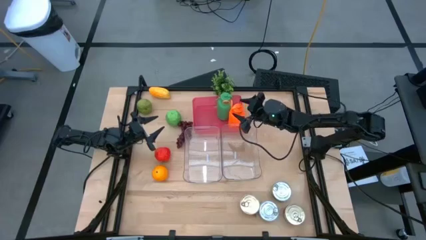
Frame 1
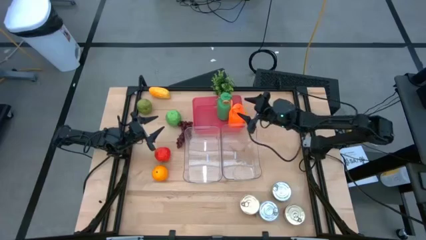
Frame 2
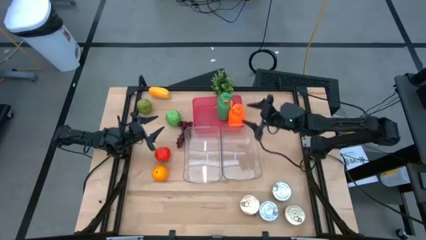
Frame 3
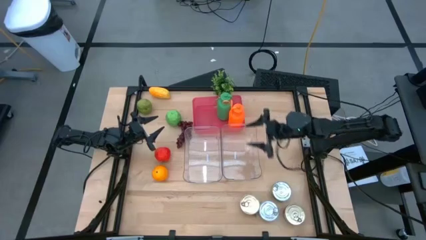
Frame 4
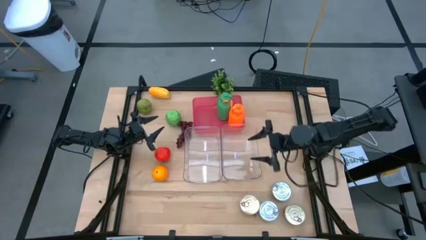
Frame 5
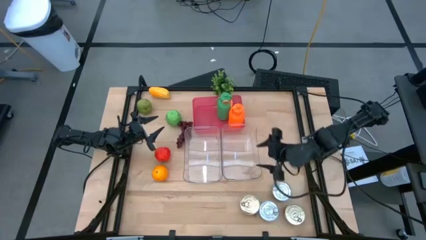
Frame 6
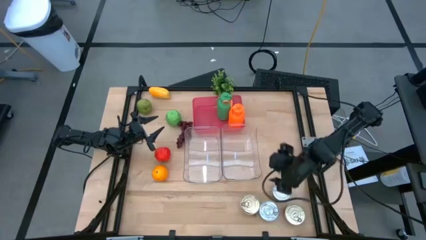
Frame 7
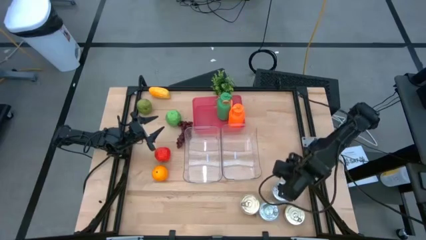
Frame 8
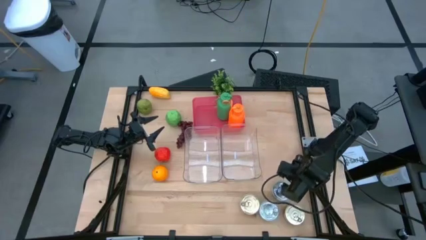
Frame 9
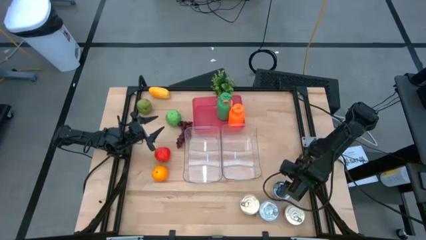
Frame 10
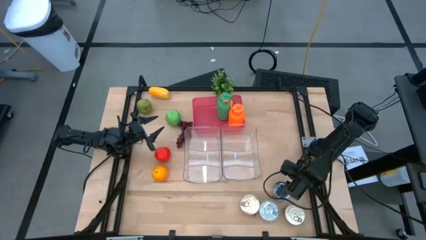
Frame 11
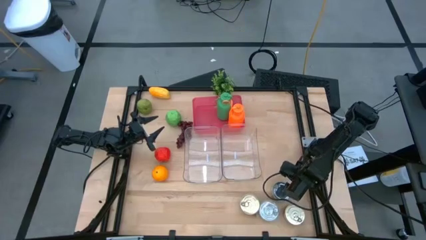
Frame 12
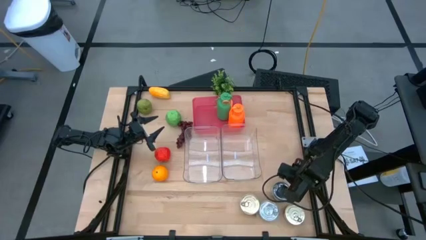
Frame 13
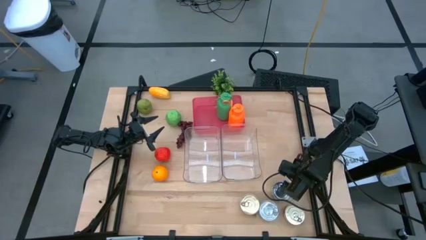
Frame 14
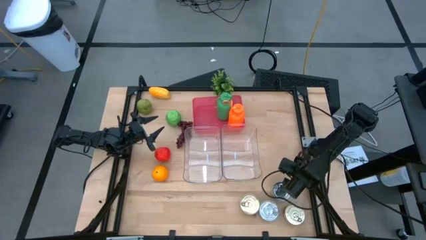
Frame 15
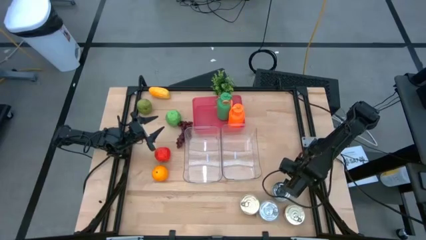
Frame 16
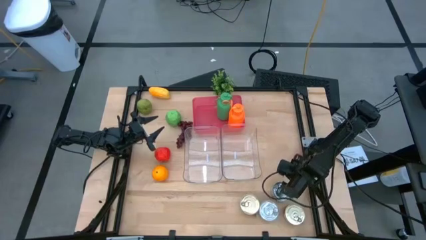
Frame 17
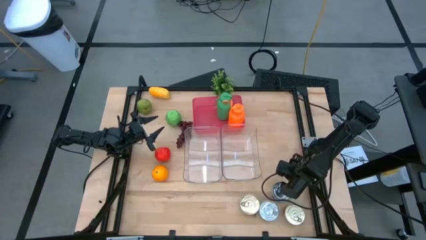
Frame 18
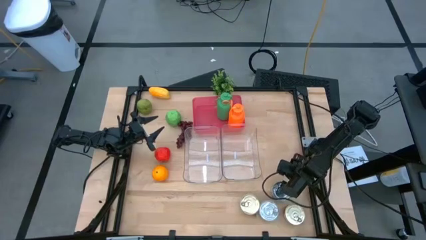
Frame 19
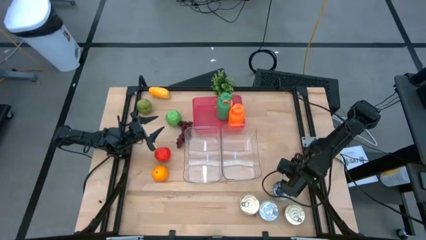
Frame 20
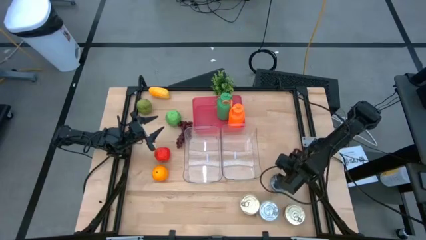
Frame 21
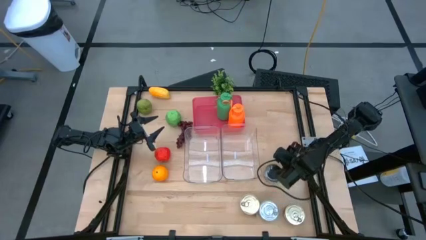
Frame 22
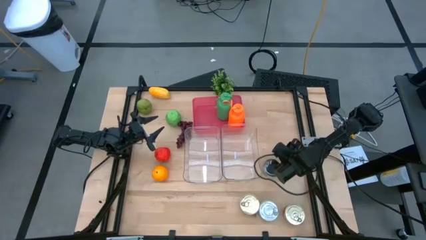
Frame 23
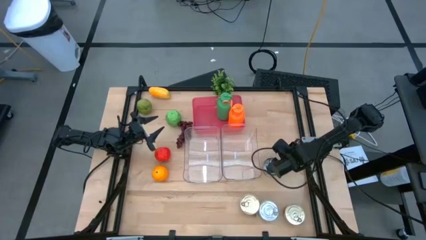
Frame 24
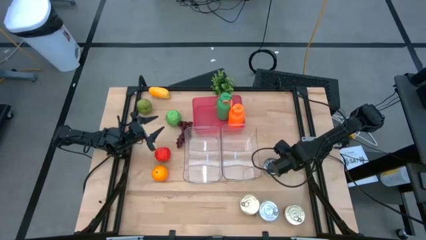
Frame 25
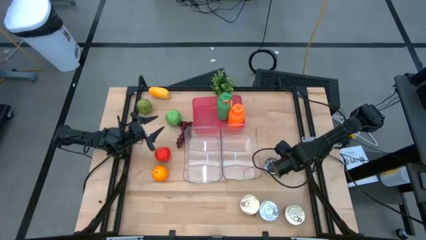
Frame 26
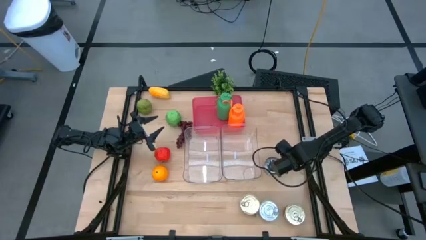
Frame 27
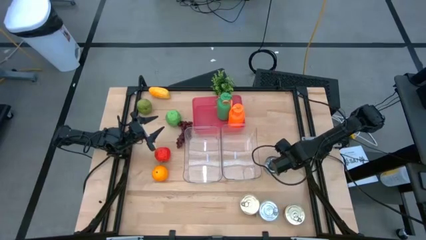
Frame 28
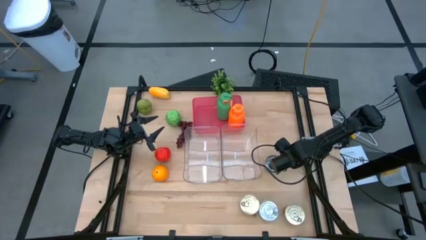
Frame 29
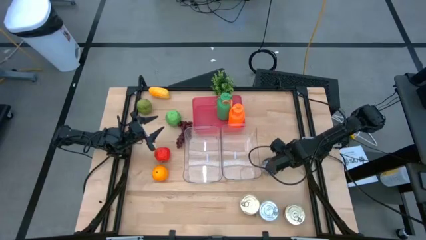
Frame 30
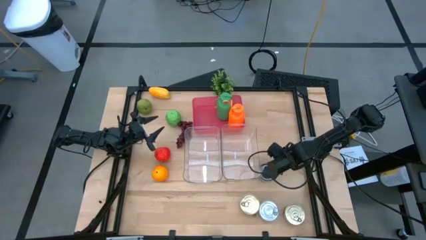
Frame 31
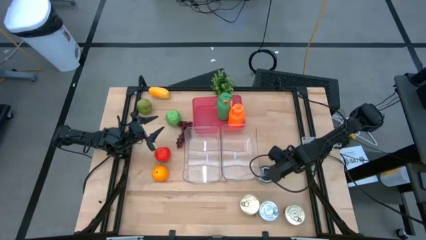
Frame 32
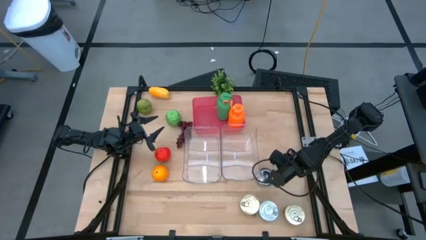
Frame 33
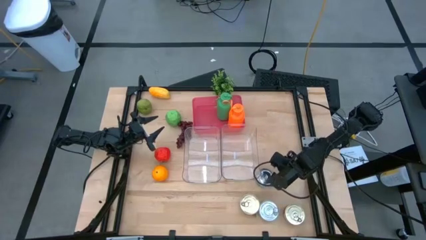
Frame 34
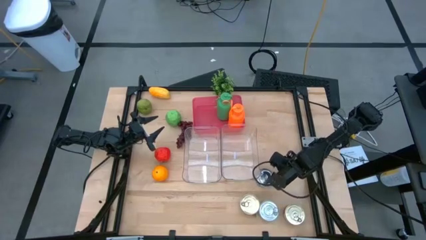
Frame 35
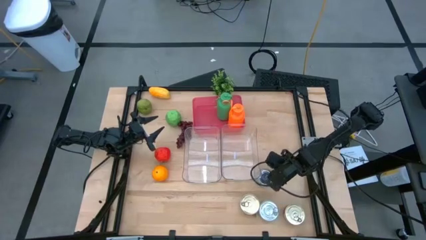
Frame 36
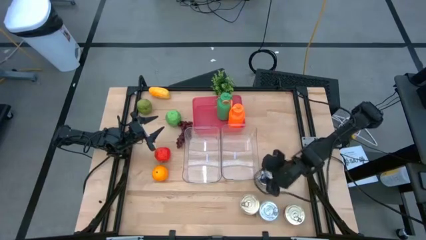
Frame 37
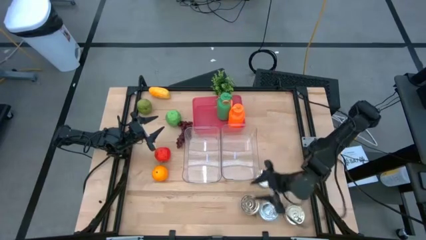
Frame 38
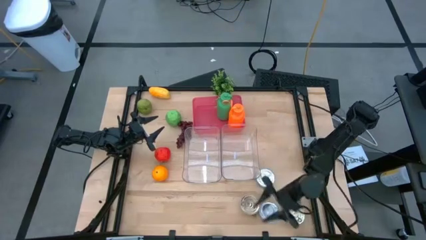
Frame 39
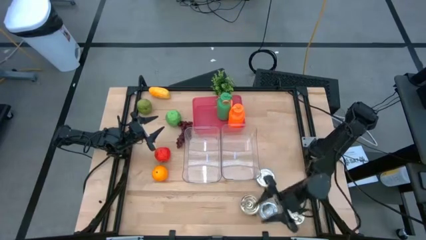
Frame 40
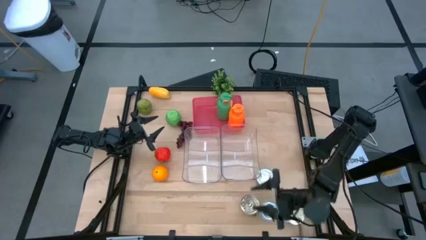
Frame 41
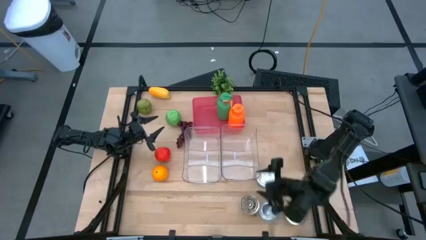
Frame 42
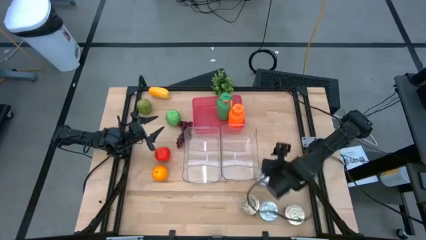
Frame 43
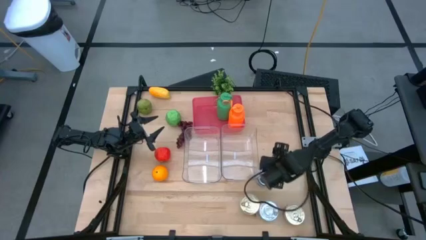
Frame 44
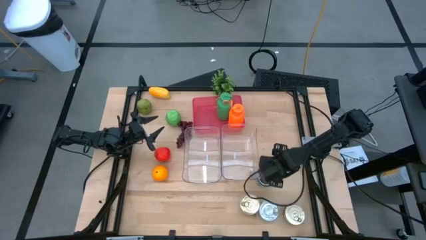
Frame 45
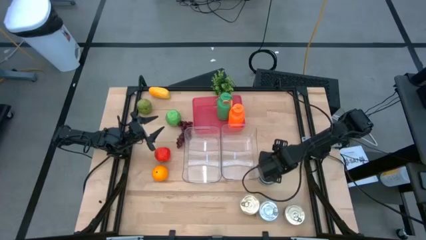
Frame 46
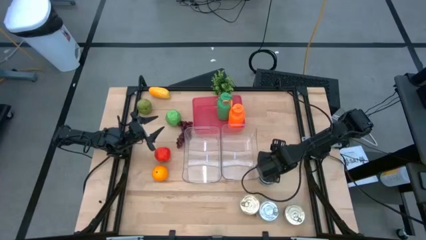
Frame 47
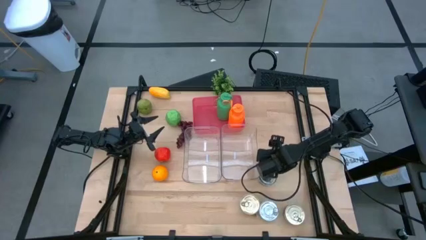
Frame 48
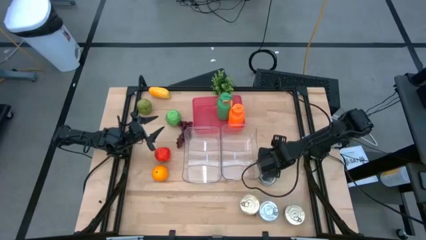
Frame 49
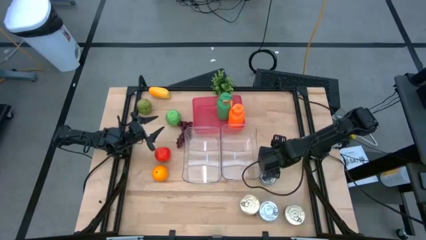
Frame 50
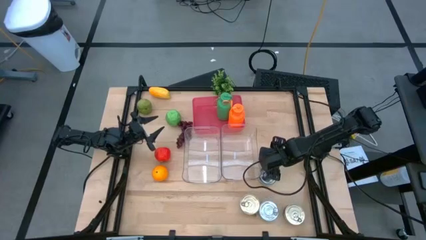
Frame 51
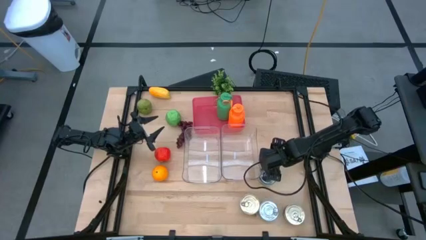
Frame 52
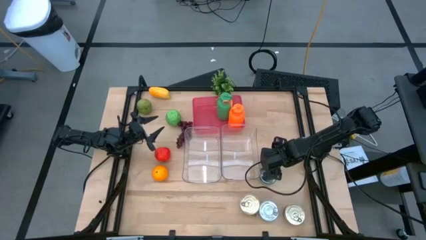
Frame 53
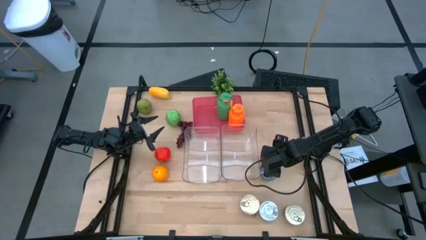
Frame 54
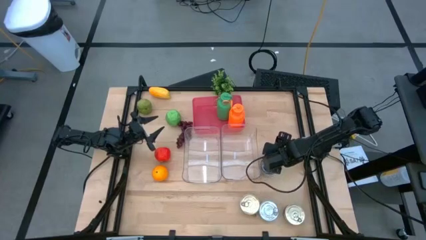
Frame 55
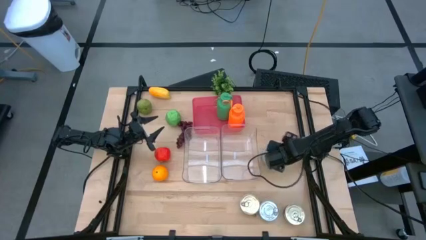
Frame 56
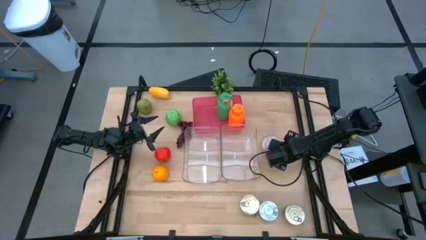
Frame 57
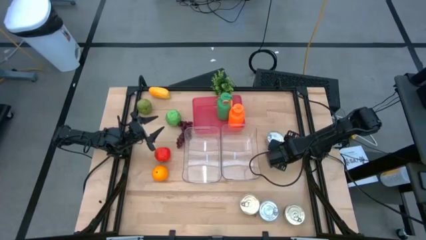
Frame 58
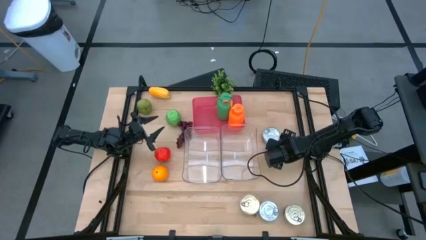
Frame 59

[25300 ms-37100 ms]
Task: Pick & Place Food Item
Put the top green tuna can into the right transparent bin

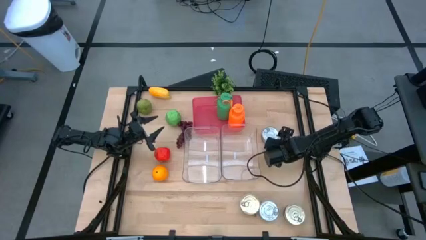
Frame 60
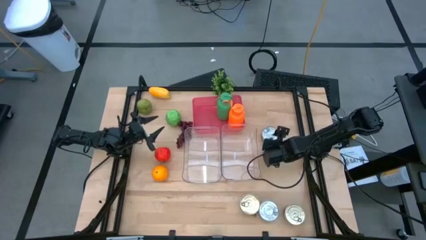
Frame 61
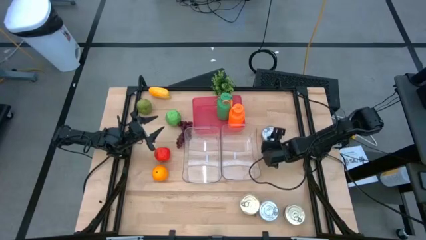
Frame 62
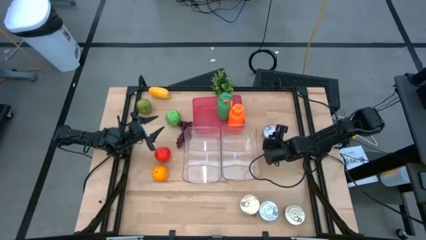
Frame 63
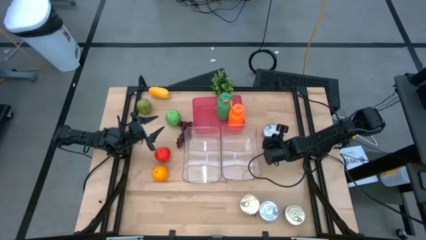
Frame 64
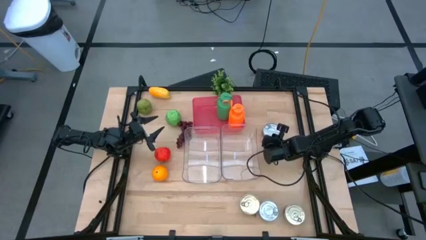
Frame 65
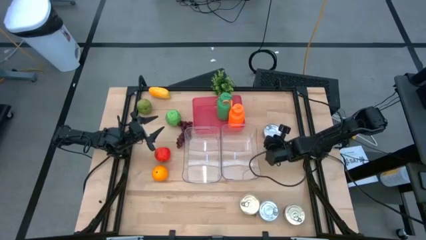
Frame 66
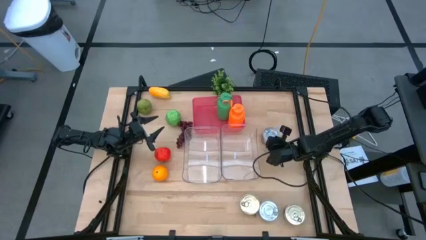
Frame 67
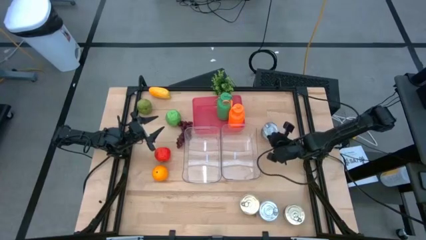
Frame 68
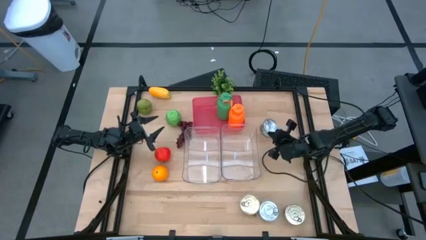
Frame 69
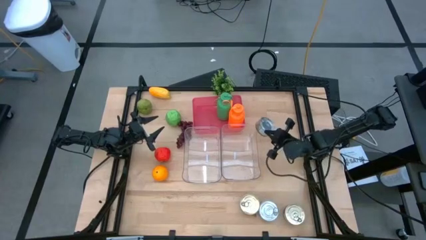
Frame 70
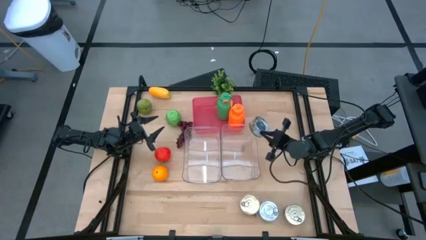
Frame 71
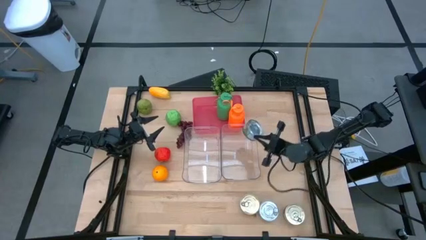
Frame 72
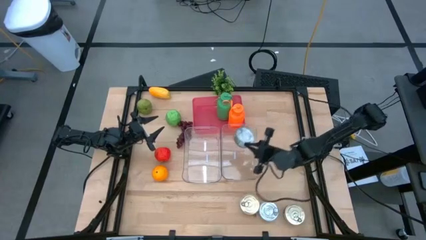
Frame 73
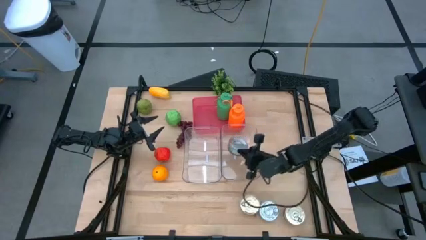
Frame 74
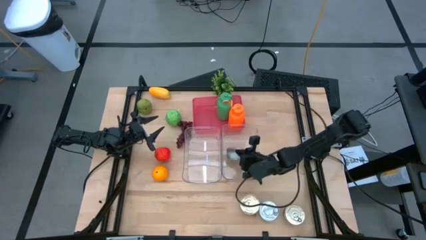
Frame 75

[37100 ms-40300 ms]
Put the top green tuna can into the right transparent bin

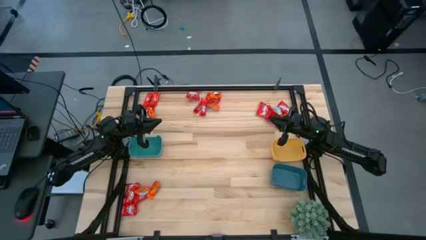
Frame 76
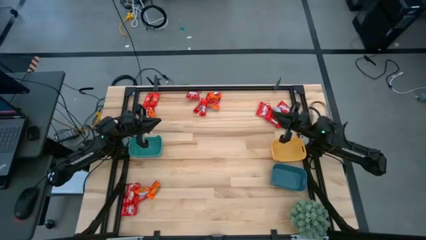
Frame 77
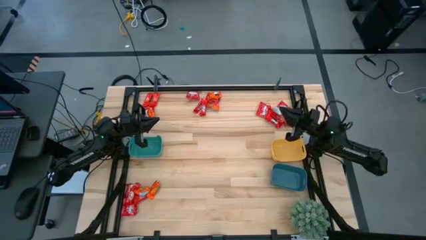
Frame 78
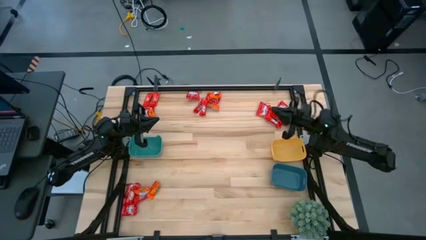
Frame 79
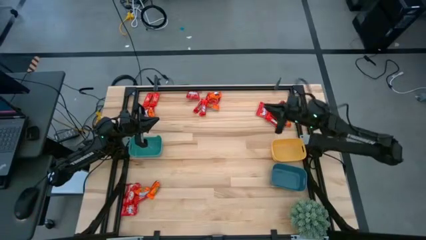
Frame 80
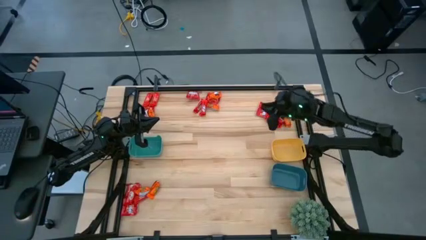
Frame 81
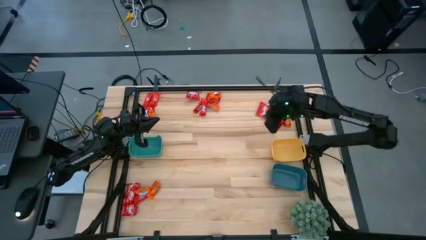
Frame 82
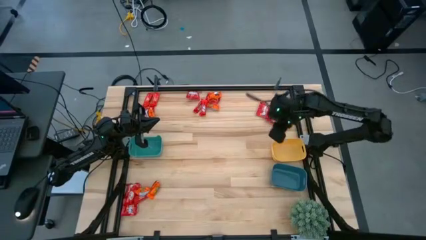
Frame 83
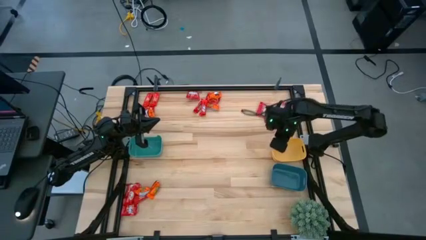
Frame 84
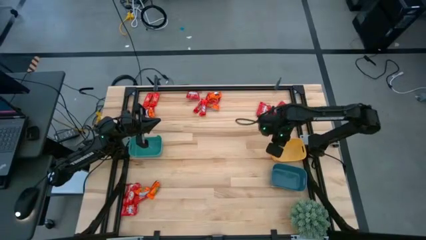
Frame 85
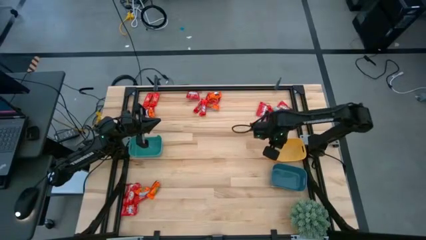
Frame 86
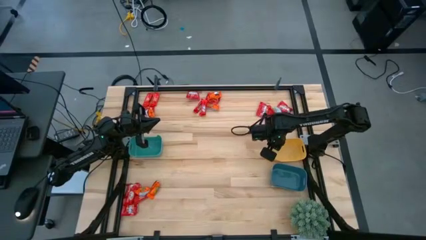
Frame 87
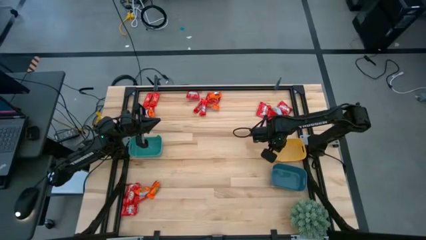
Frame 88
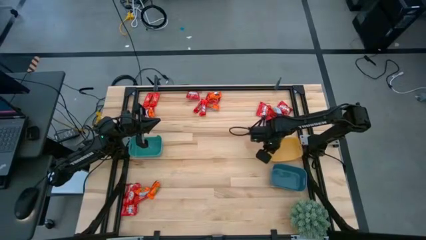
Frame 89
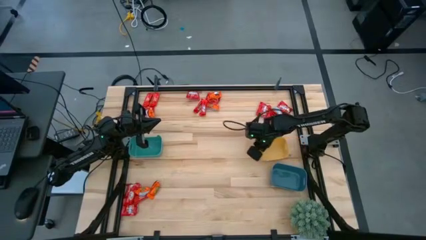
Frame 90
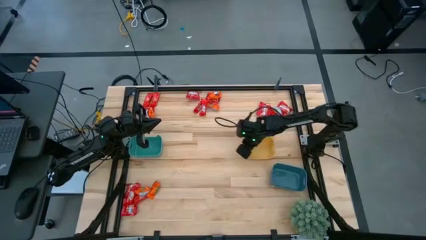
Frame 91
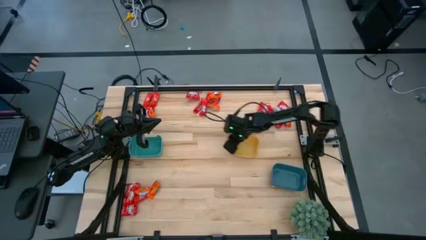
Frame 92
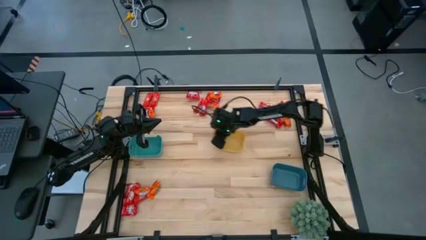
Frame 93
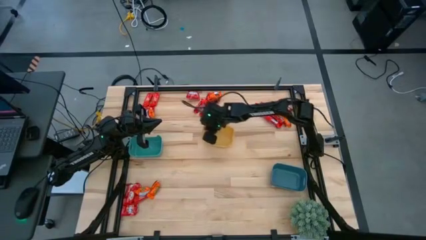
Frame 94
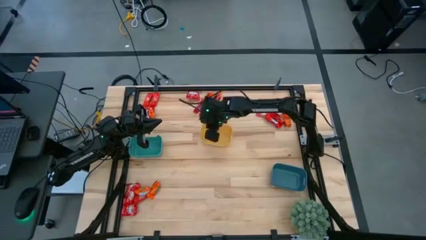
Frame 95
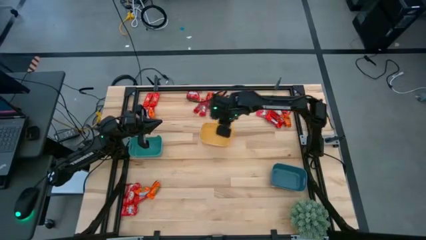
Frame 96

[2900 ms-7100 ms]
Task: Sort candy
Move the yellow bin to the center of the table
